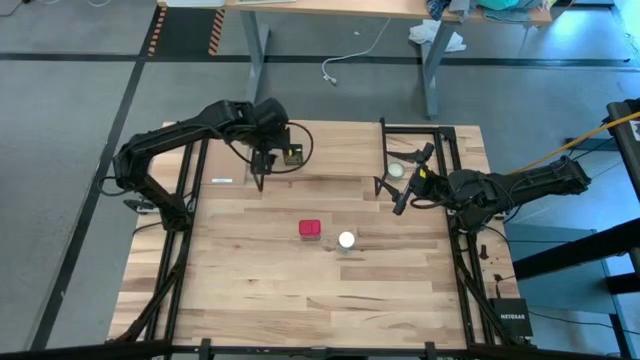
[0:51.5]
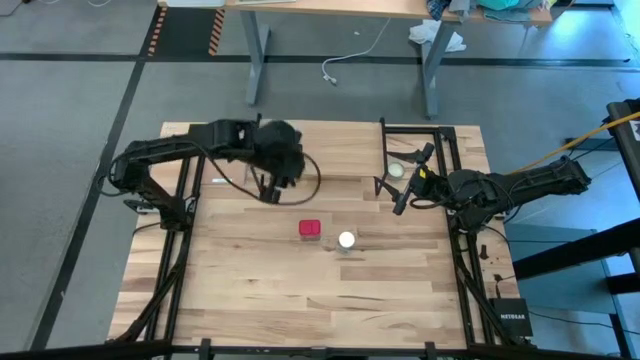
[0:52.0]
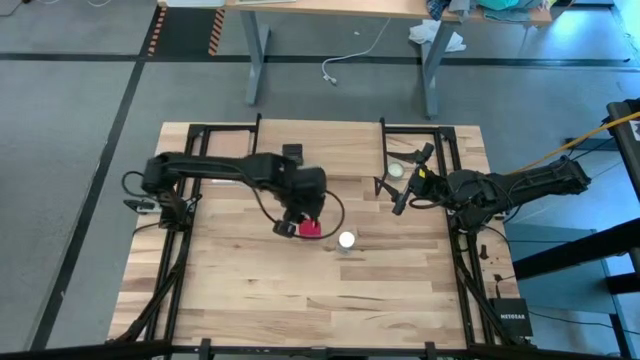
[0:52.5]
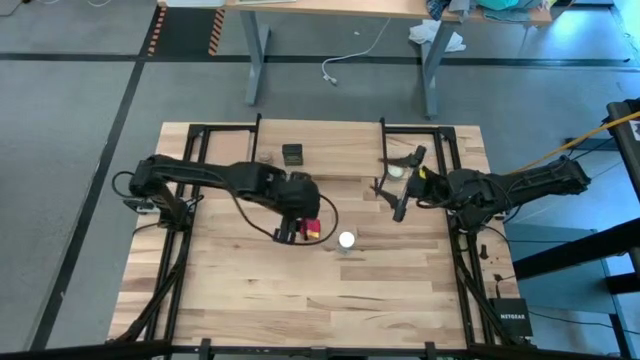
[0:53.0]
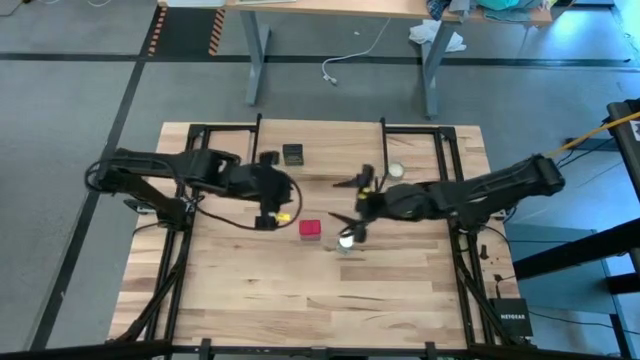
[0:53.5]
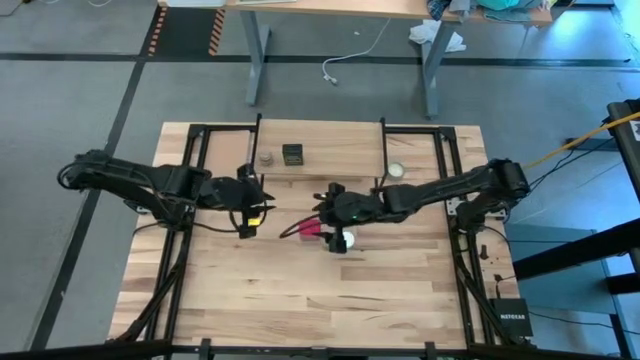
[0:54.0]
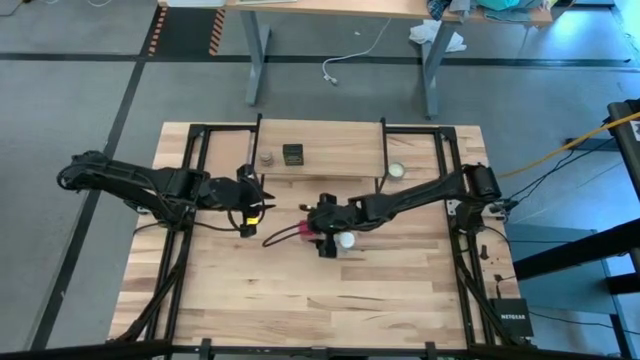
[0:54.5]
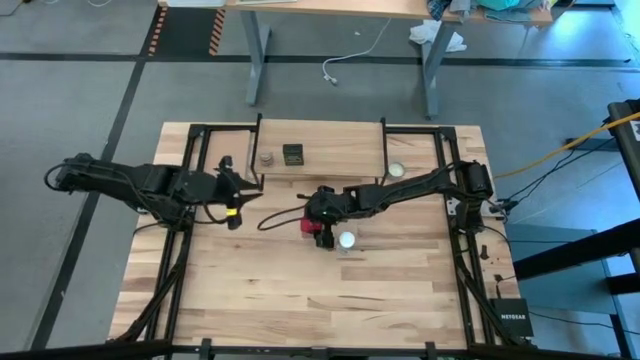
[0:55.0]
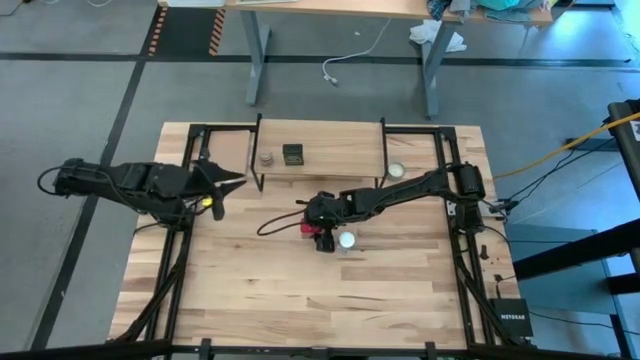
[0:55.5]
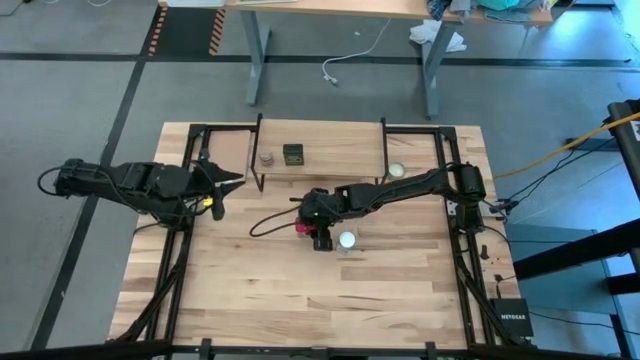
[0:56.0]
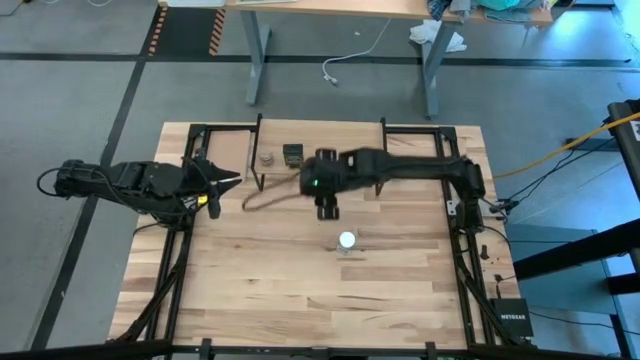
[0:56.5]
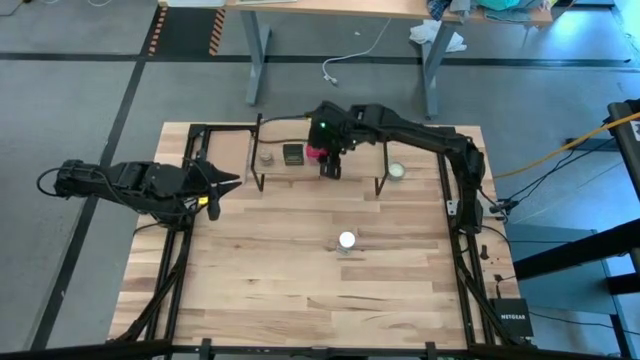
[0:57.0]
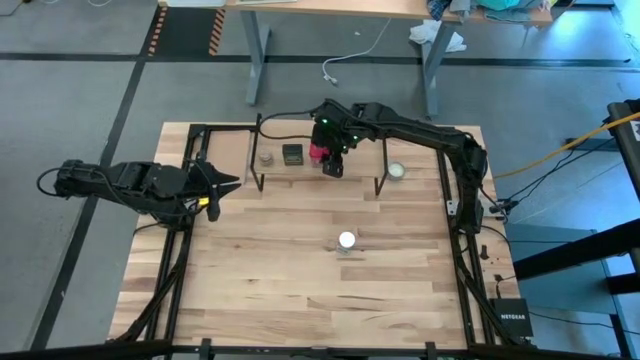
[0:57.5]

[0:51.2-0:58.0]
Task: Shelf spices
Put the red seasoning can on the shelf

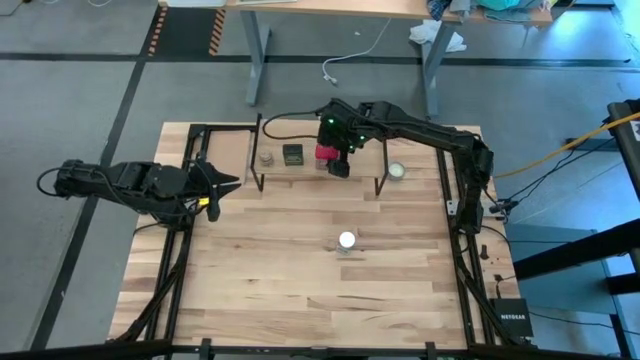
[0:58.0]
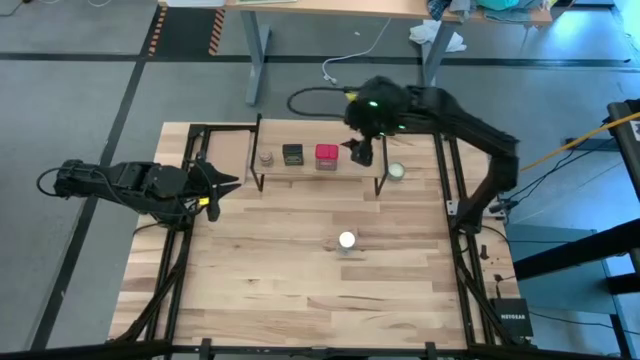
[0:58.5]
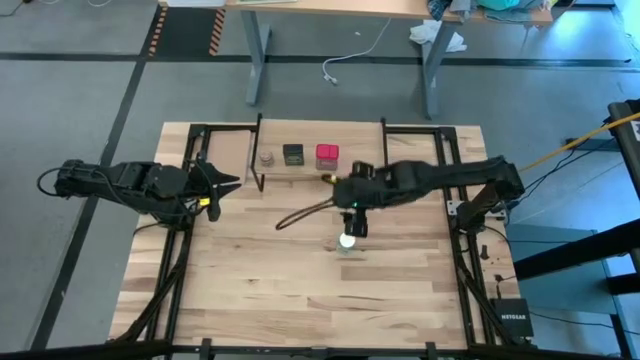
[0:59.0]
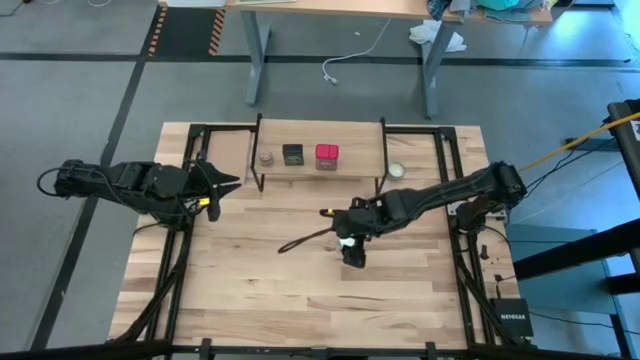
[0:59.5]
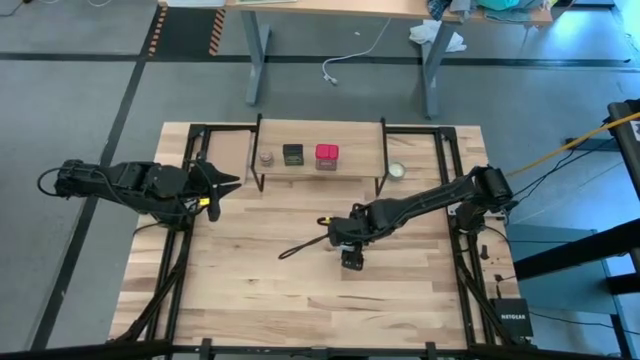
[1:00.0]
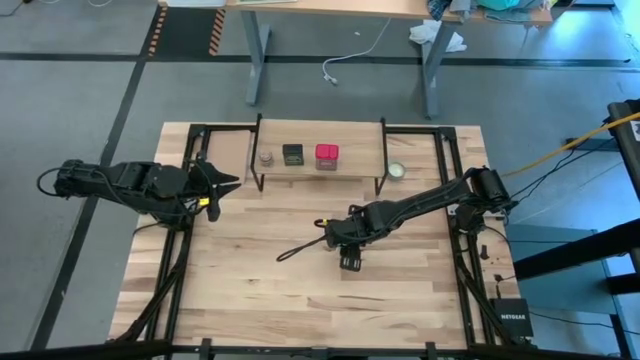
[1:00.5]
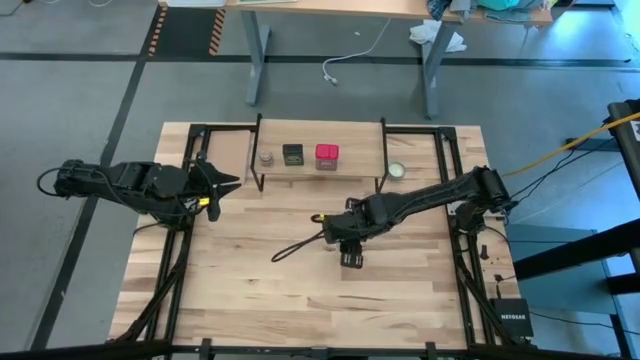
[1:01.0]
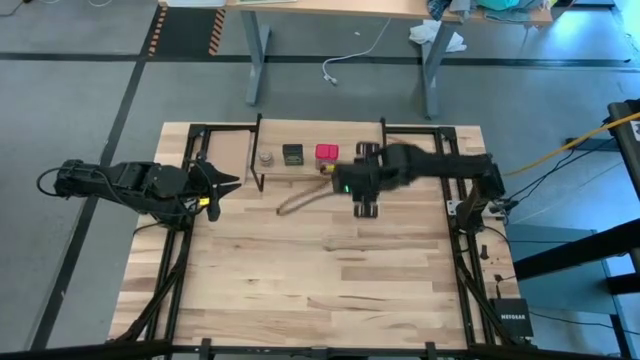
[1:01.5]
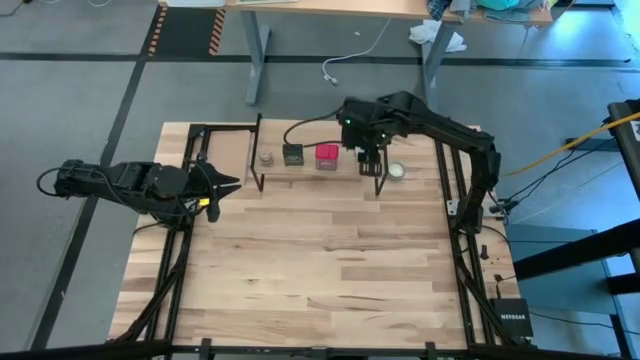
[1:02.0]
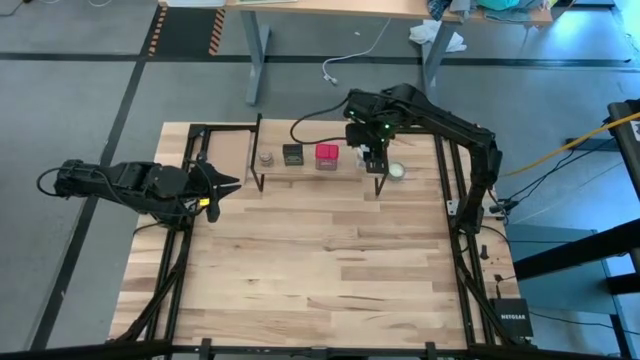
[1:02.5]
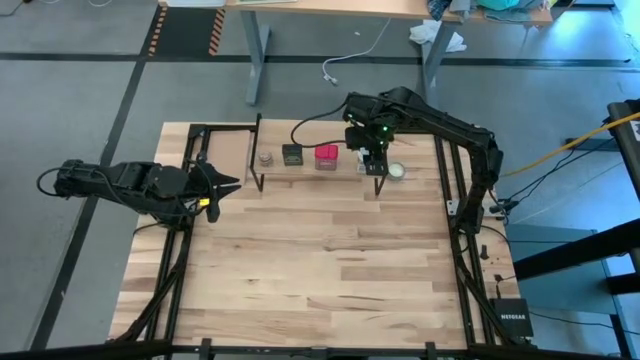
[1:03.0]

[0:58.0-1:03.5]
Put the white seasoning bottle on the shelf

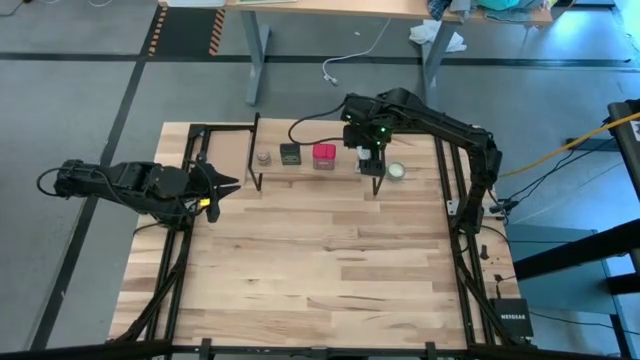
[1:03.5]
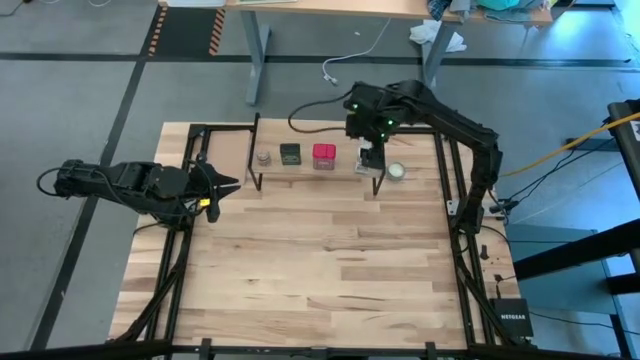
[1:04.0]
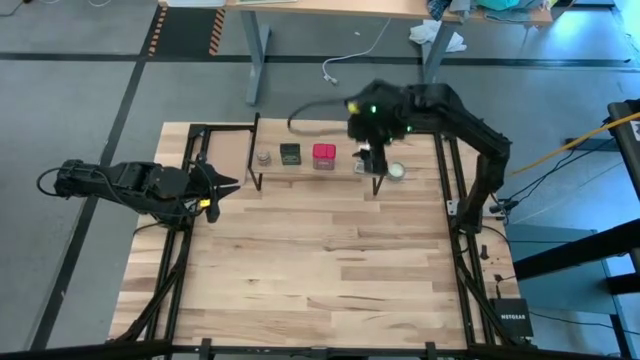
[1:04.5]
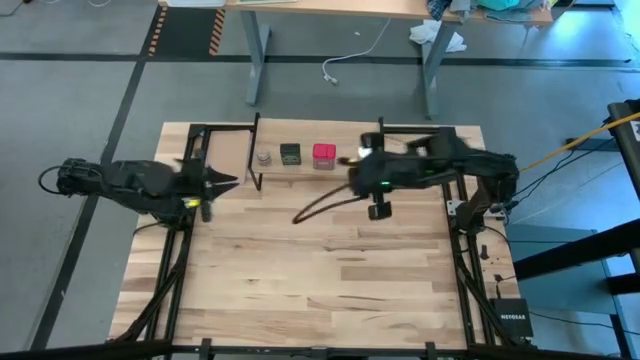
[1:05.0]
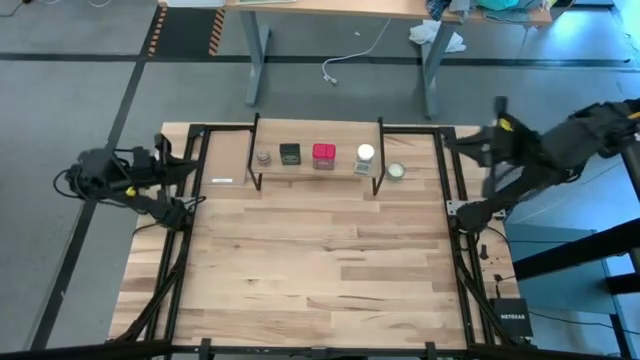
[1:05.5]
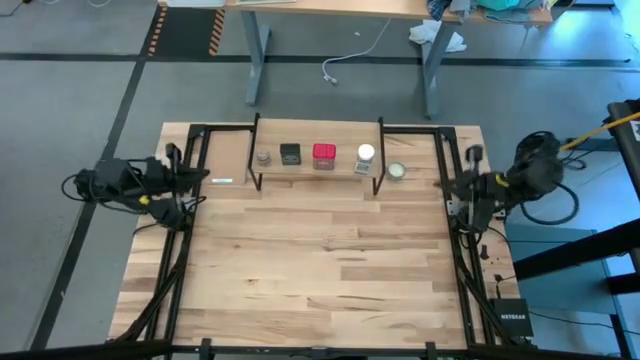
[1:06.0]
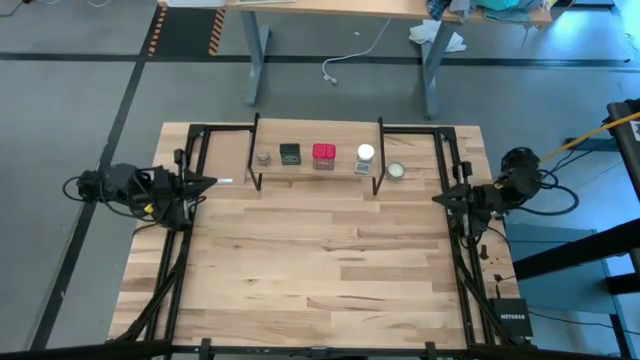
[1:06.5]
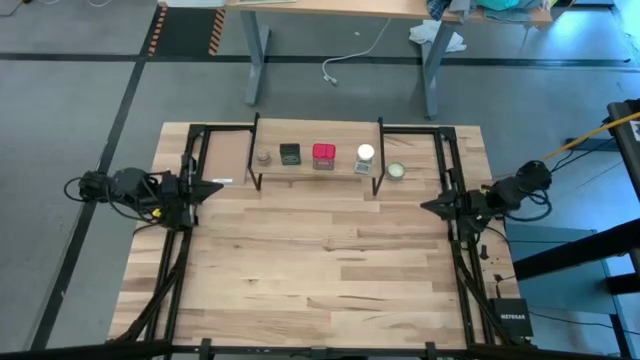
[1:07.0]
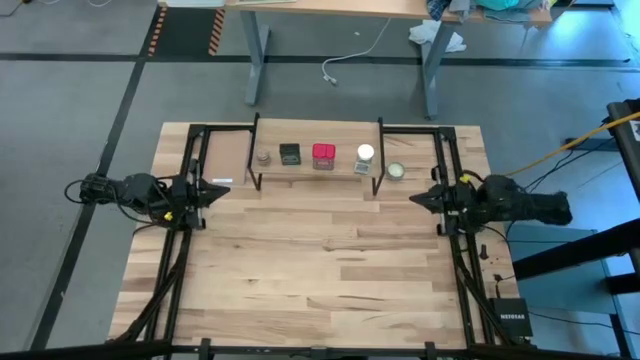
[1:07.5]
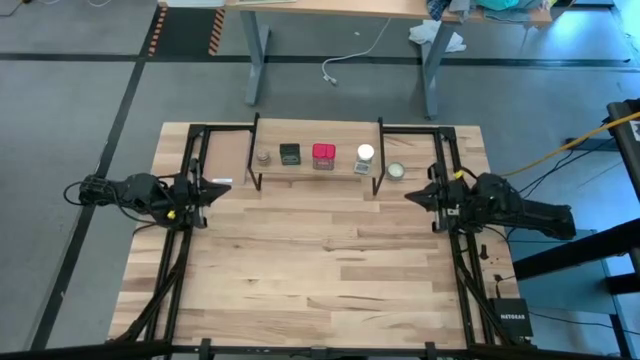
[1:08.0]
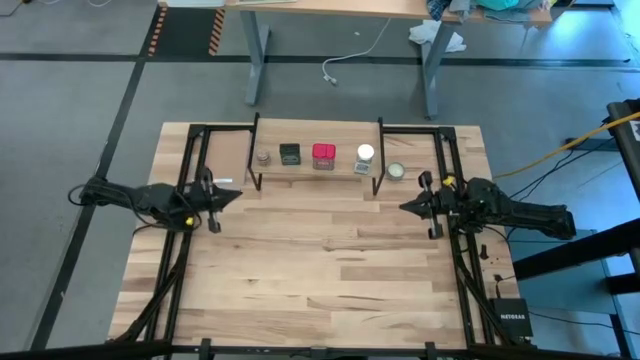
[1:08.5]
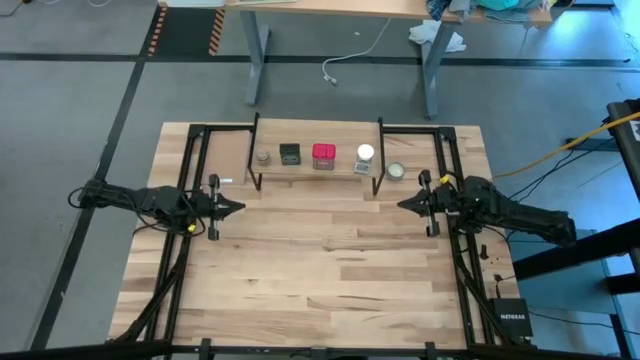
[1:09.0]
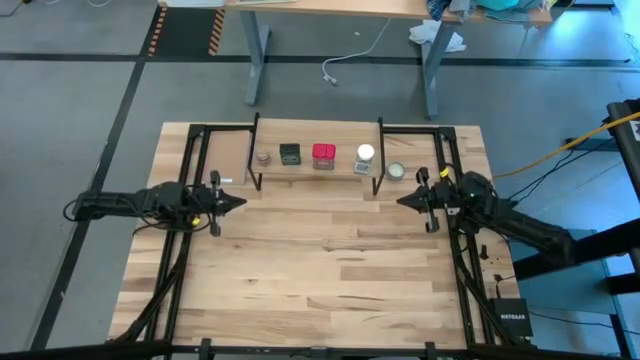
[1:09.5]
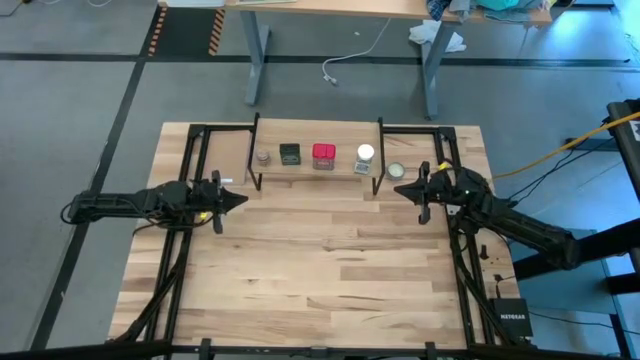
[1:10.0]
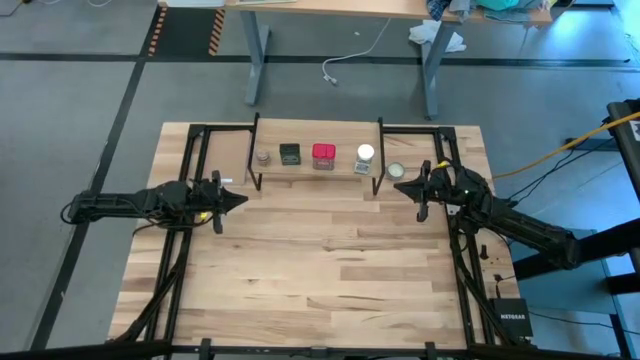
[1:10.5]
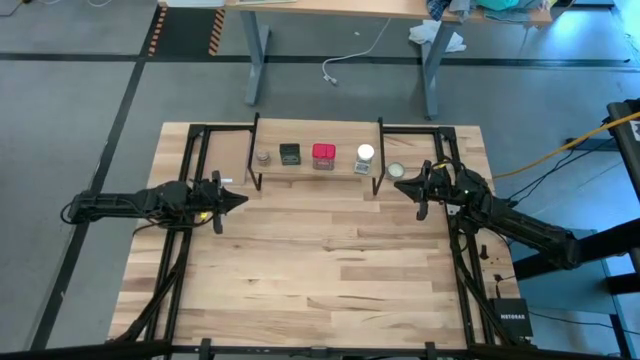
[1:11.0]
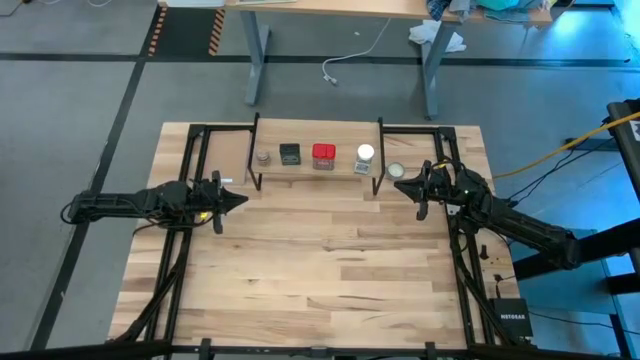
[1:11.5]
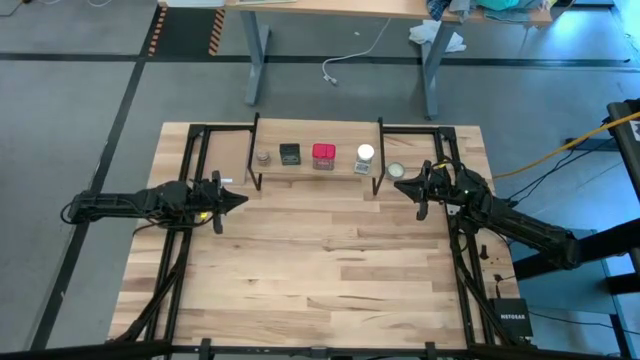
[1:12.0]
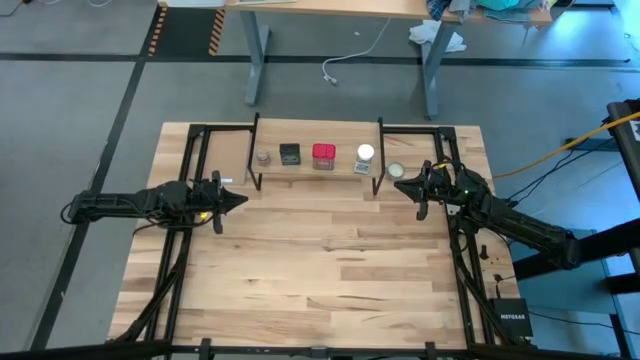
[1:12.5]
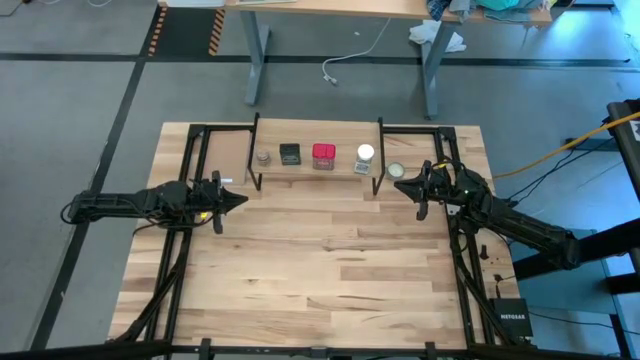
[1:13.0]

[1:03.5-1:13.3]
Return to Home Position
